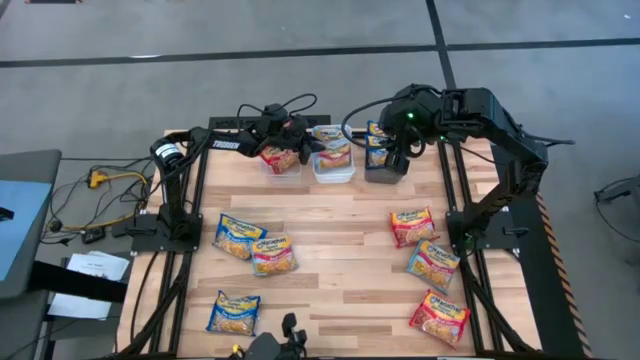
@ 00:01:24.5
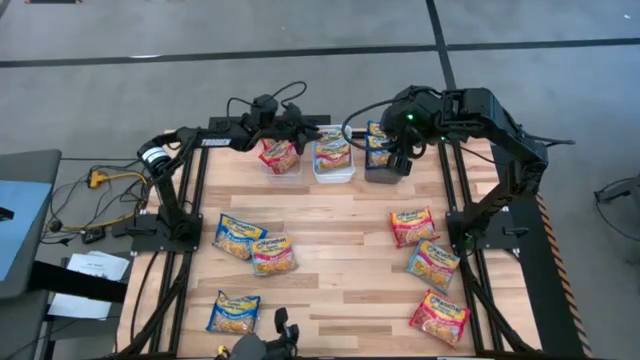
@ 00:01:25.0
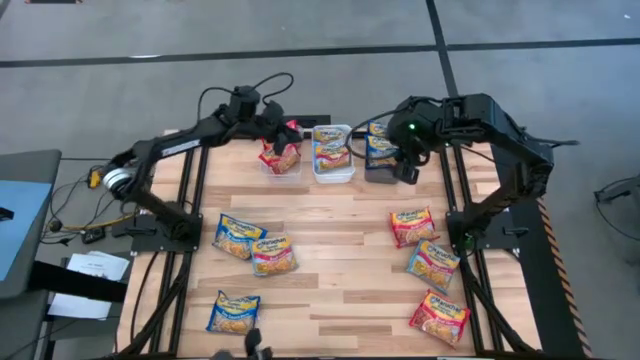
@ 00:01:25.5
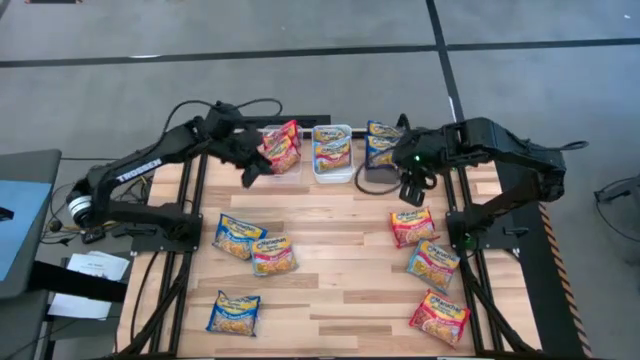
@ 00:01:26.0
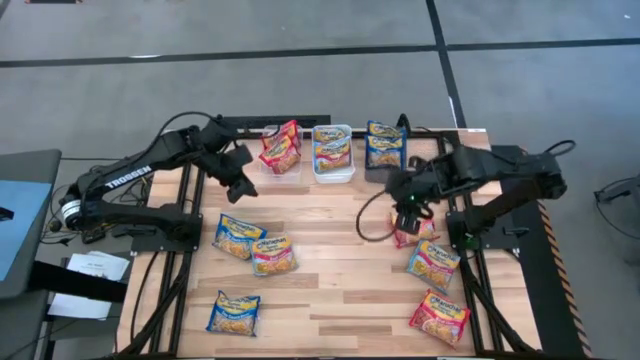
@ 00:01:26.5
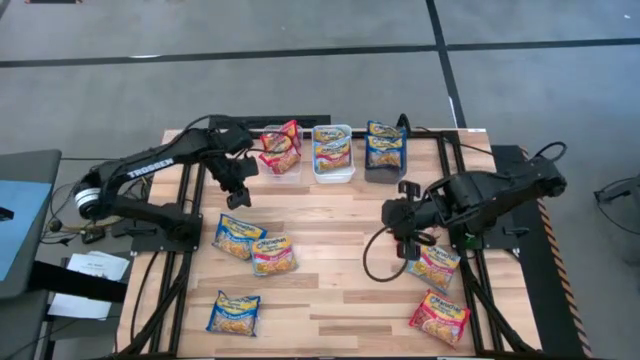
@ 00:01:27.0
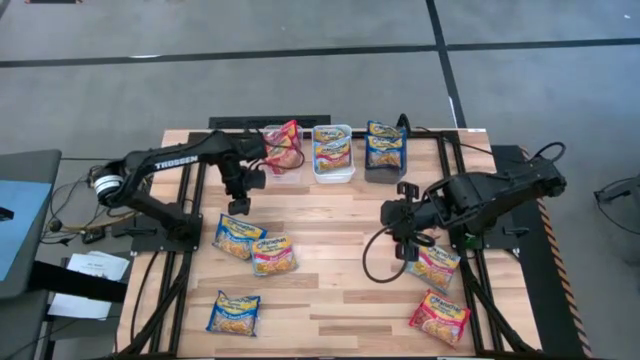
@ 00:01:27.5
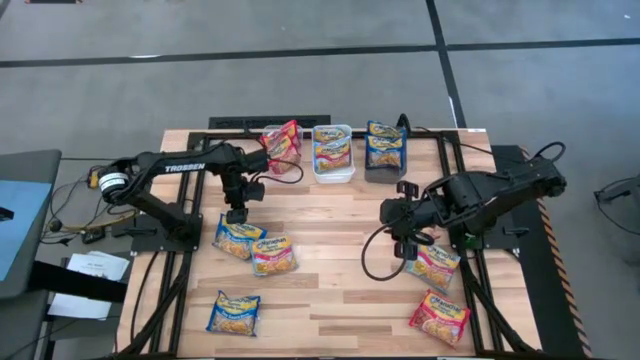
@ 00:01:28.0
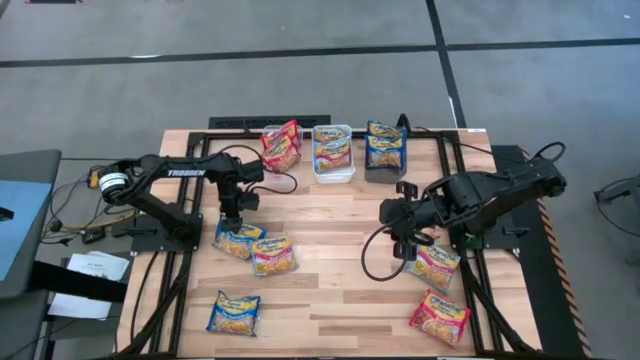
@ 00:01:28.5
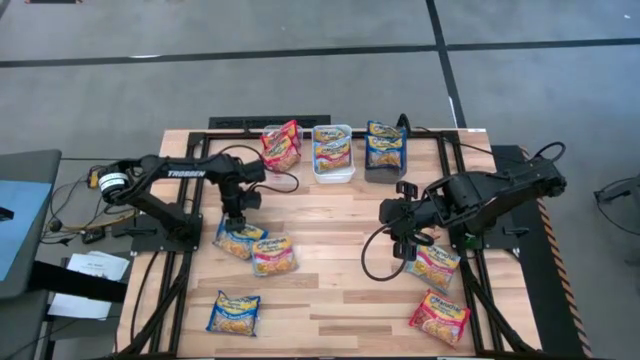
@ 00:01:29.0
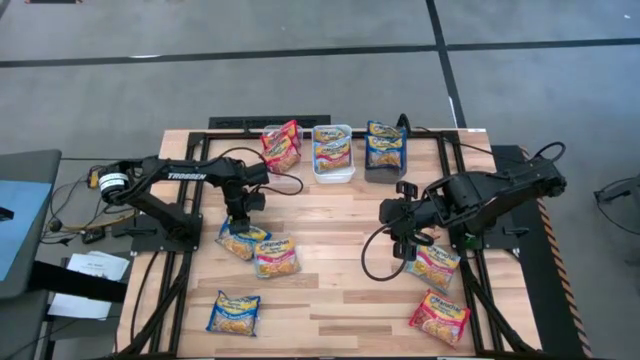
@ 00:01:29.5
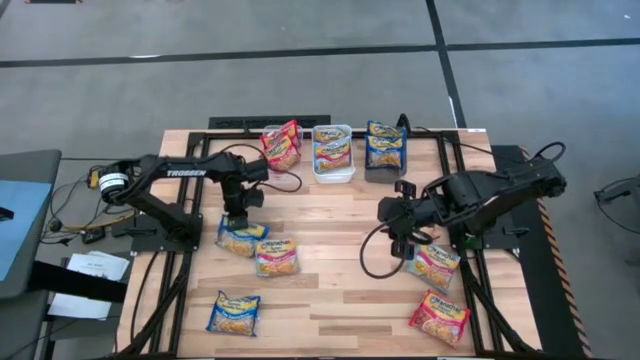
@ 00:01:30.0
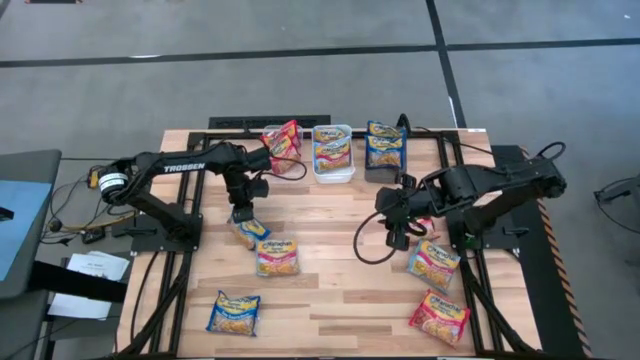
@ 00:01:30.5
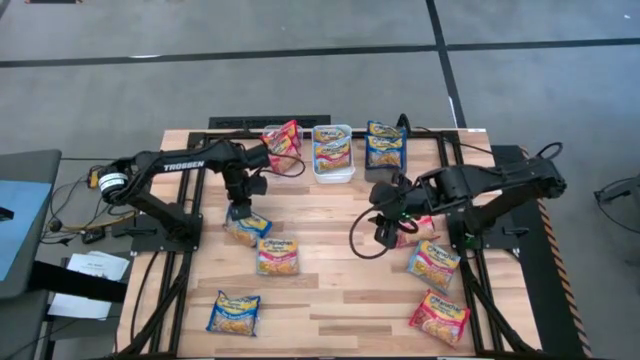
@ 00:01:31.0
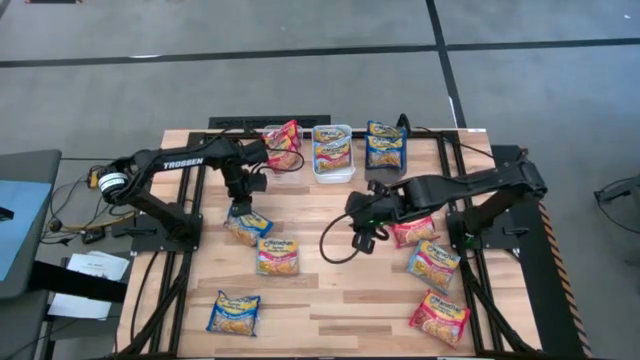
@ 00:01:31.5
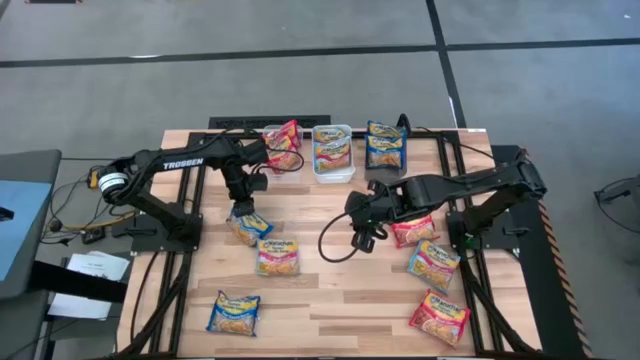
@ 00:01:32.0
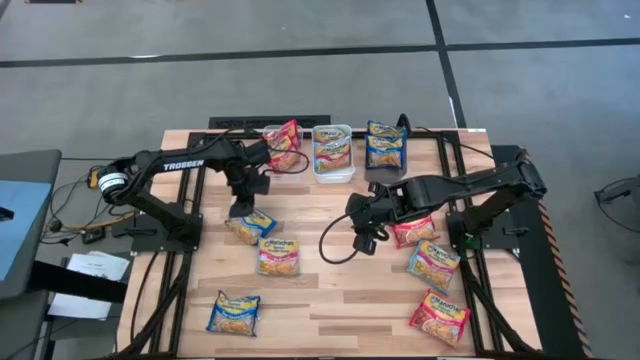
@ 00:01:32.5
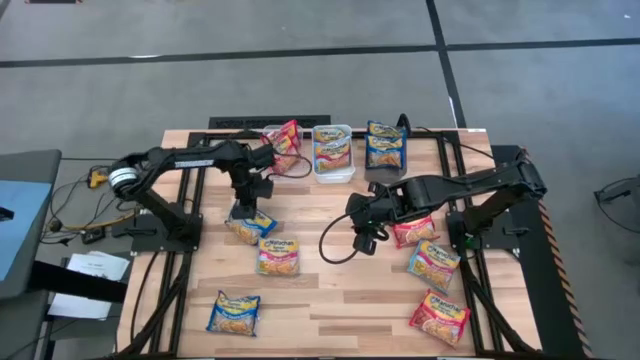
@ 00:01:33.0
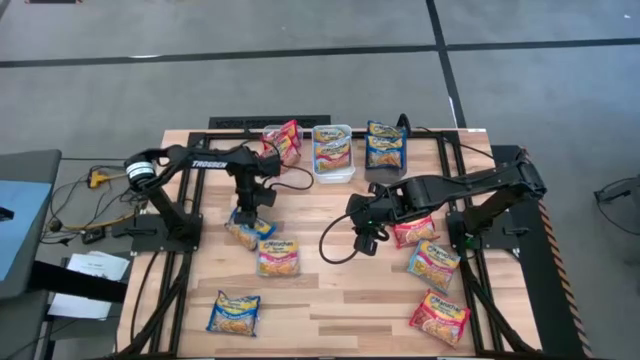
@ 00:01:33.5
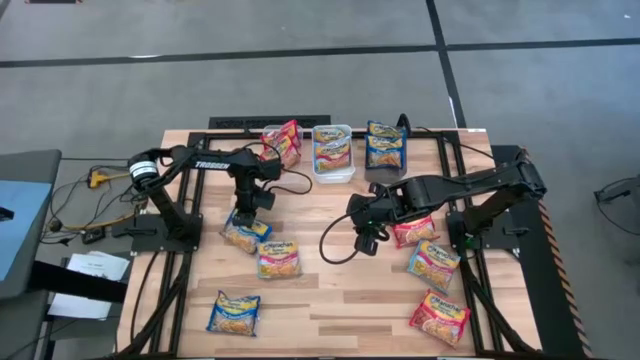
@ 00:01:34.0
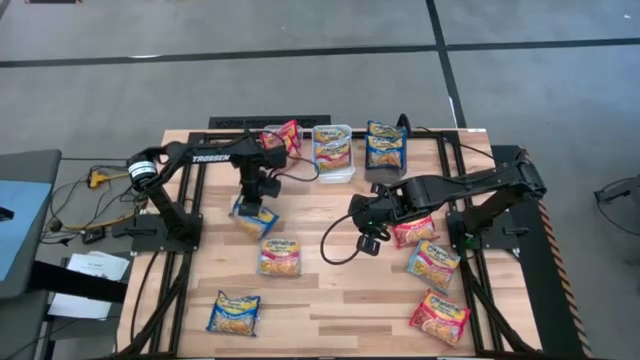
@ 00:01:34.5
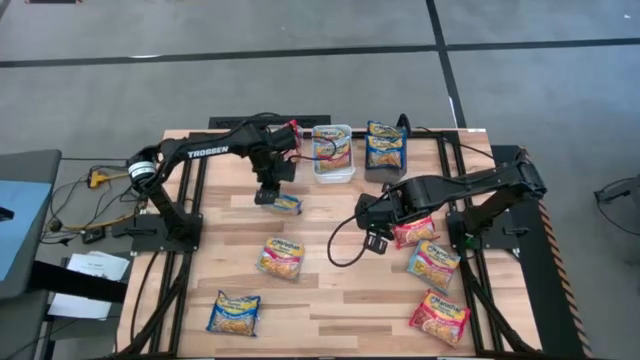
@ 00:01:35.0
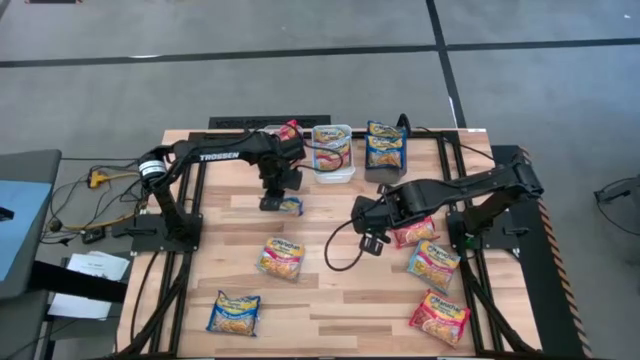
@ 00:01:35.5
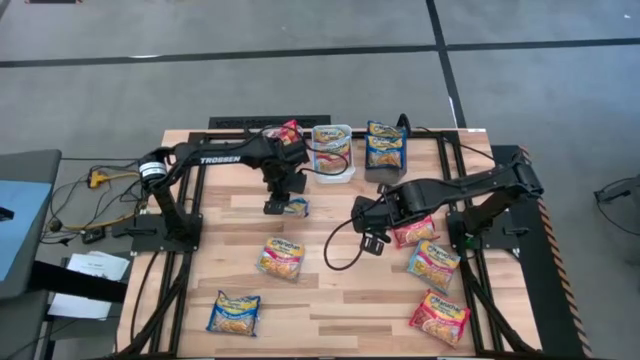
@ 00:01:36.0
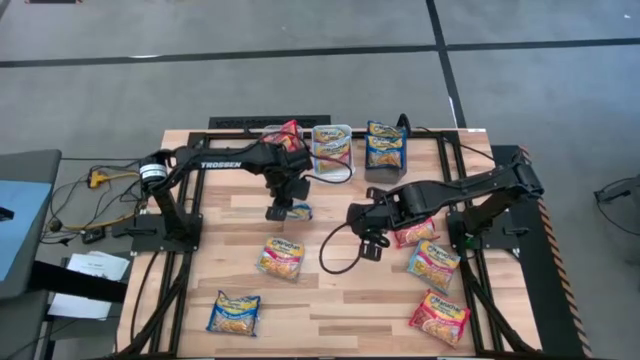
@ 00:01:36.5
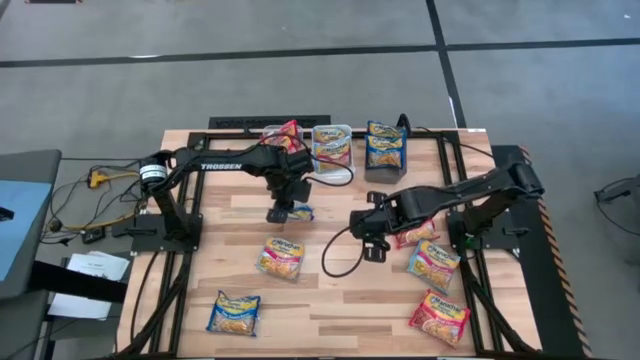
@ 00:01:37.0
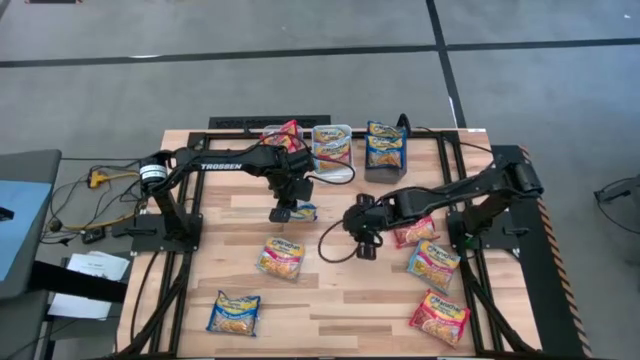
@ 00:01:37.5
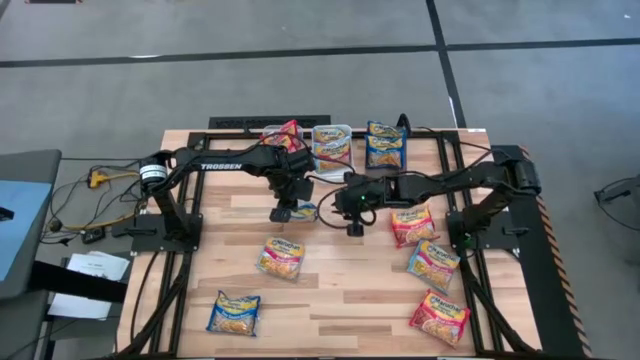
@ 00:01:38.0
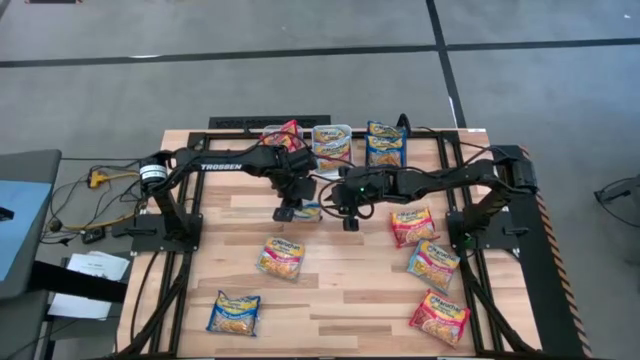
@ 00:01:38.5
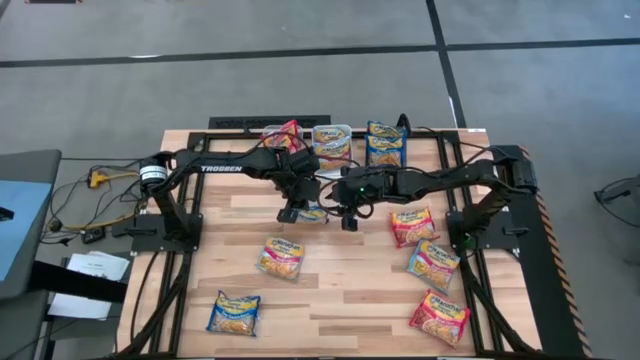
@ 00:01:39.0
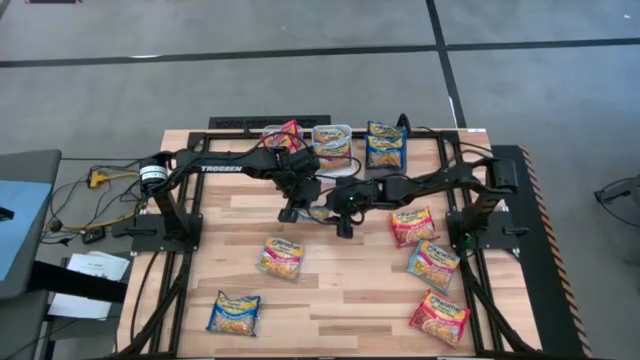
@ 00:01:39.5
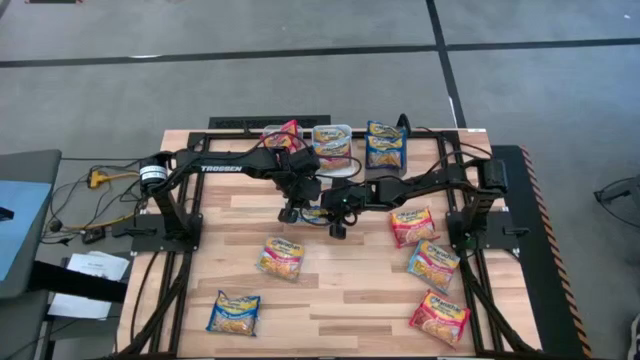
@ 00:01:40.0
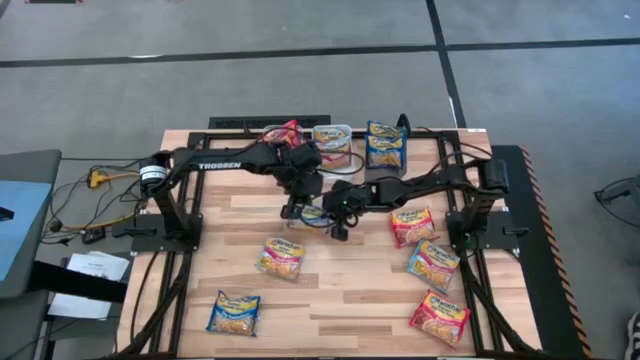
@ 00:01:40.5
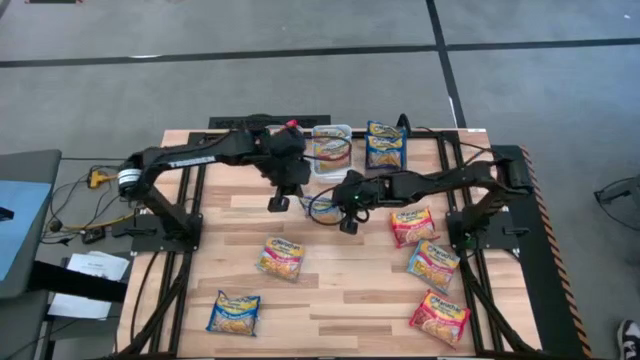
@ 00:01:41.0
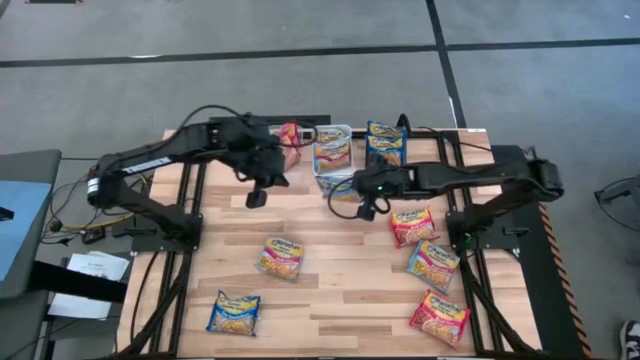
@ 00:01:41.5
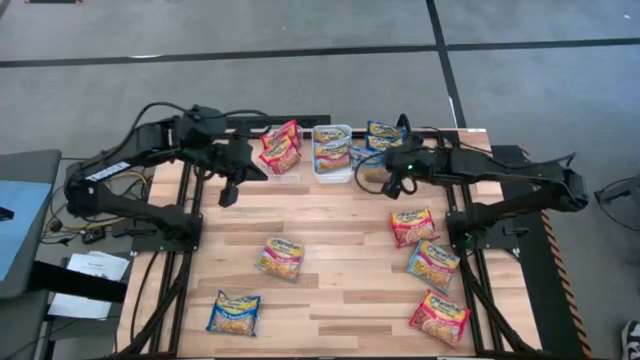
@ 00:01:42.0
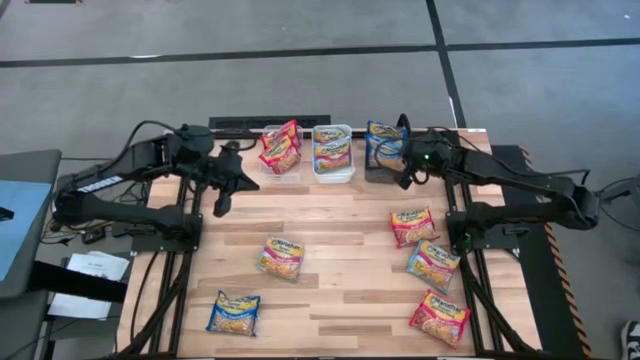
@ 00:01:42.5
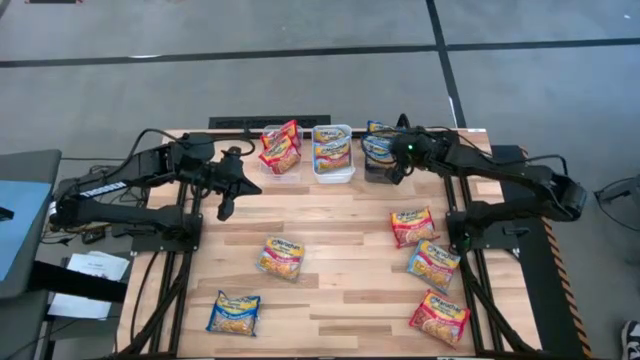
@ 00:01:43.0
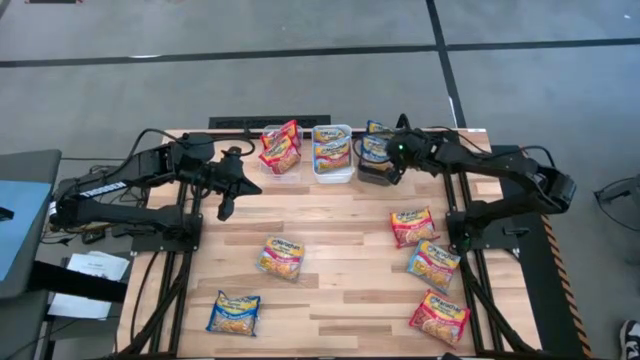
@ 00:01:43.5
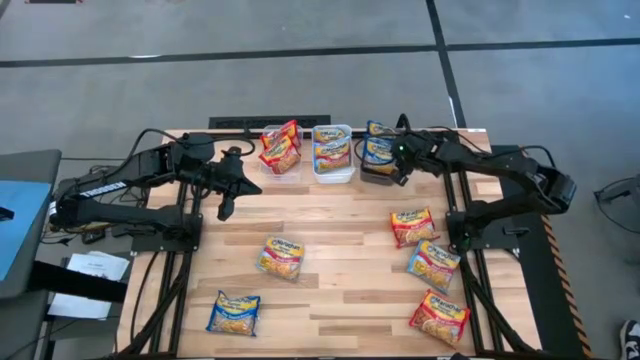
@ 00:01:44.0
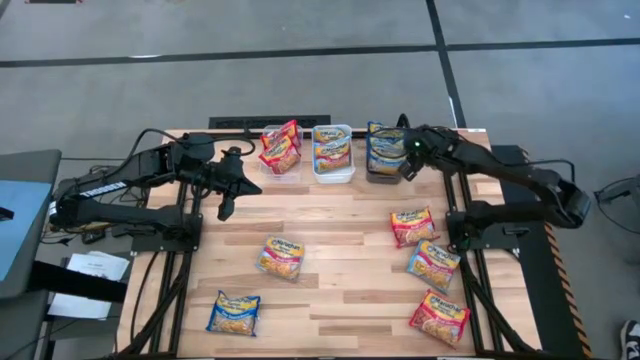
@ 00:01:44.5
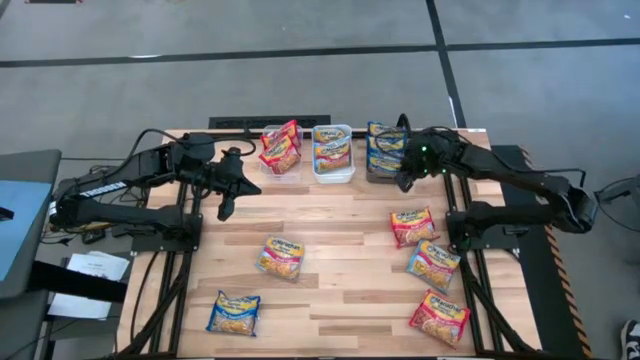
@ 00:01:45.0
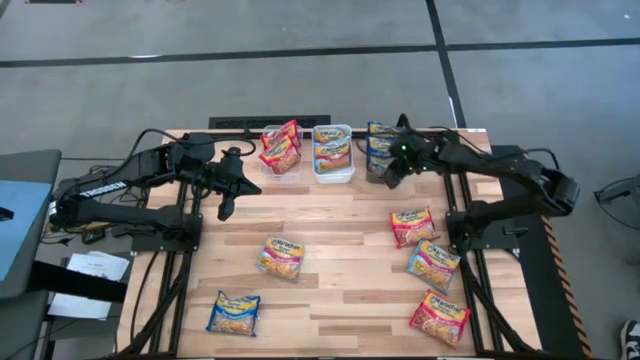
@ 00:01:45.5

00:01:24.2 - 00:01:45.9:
Task: Sort Maruchan noodles
Put the blue noodle pack into the black bin
